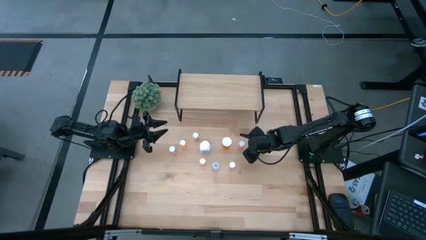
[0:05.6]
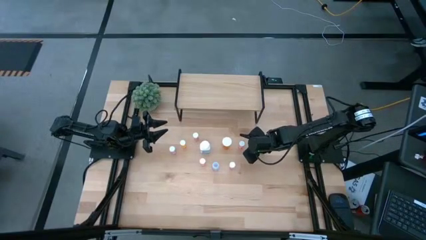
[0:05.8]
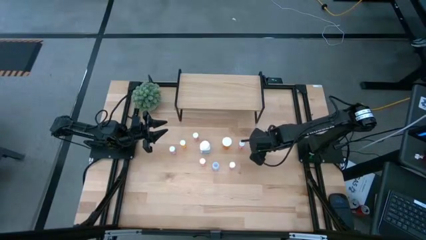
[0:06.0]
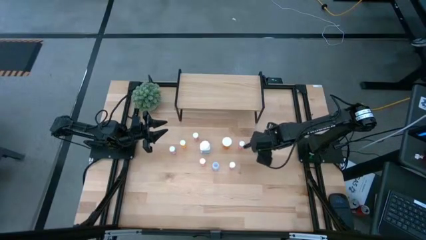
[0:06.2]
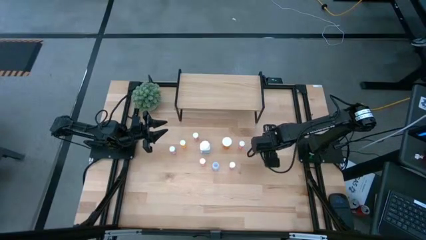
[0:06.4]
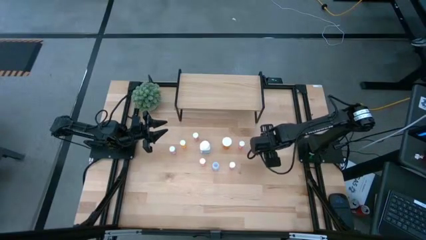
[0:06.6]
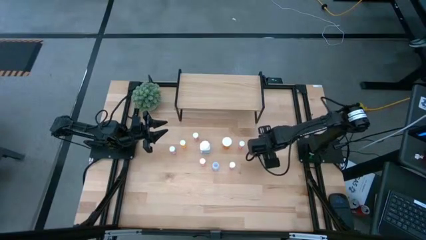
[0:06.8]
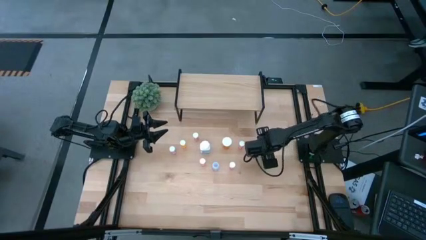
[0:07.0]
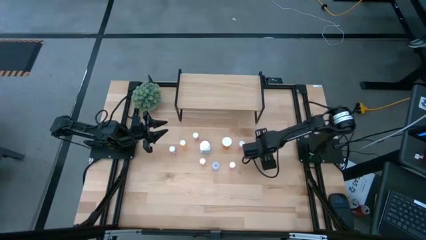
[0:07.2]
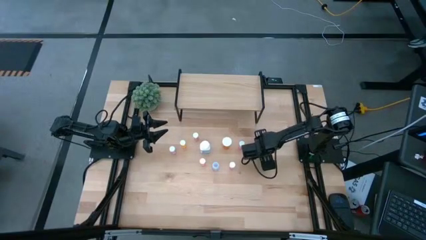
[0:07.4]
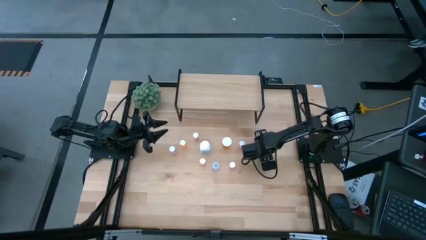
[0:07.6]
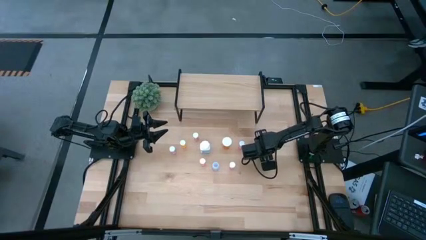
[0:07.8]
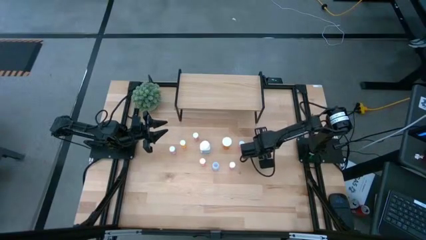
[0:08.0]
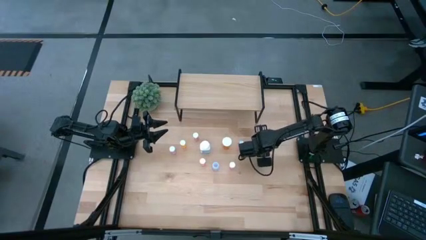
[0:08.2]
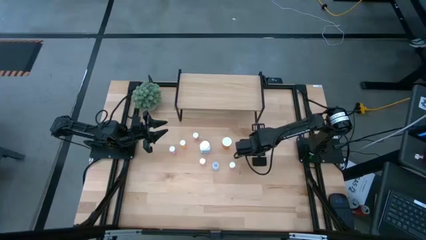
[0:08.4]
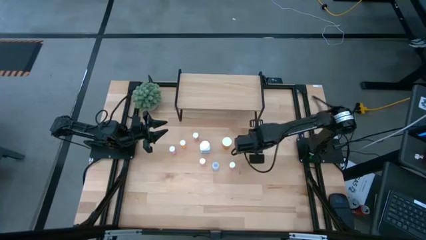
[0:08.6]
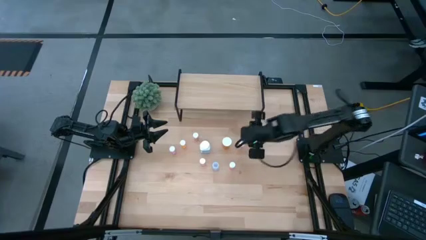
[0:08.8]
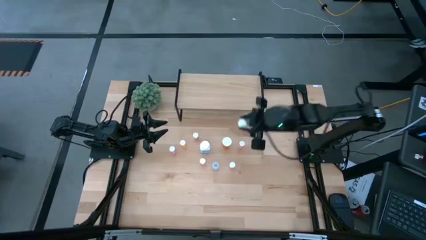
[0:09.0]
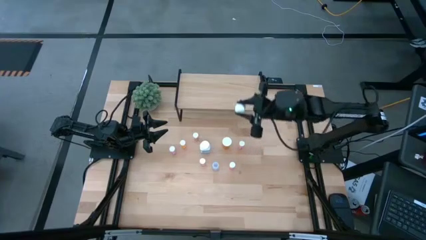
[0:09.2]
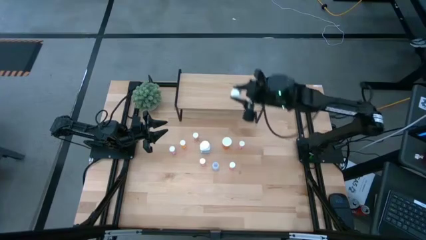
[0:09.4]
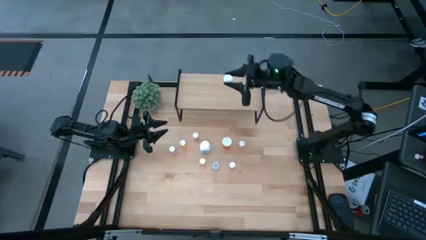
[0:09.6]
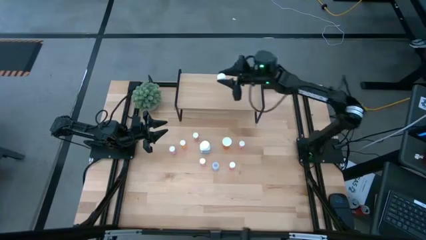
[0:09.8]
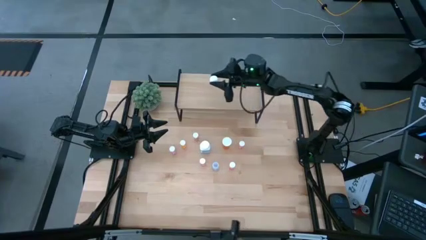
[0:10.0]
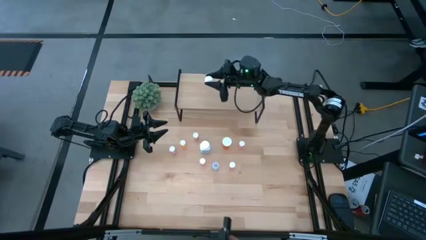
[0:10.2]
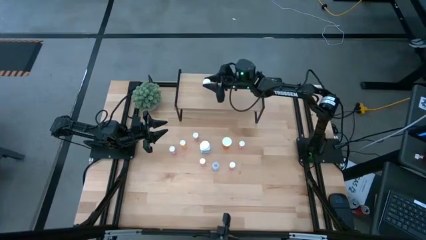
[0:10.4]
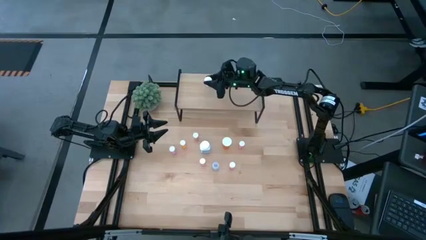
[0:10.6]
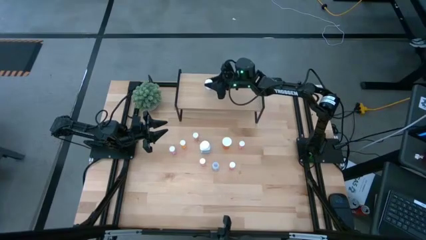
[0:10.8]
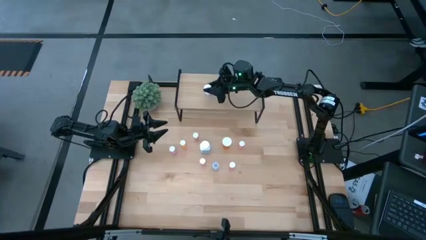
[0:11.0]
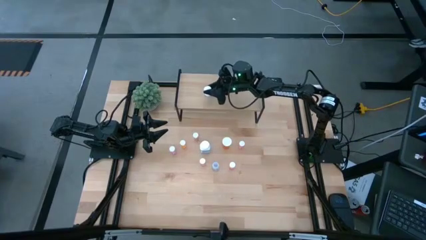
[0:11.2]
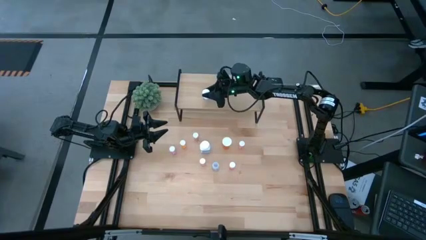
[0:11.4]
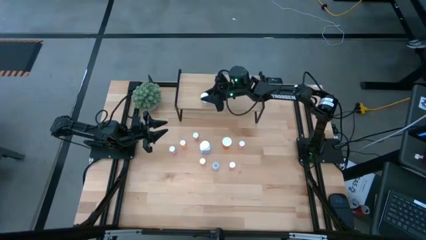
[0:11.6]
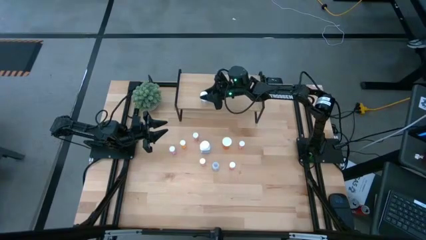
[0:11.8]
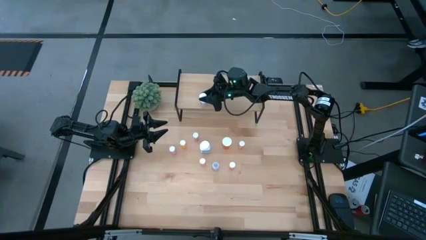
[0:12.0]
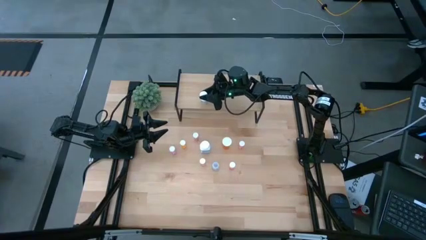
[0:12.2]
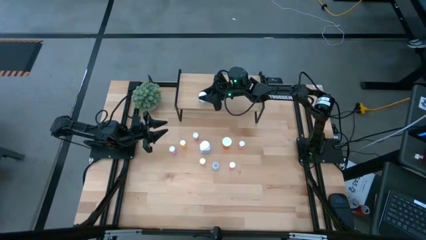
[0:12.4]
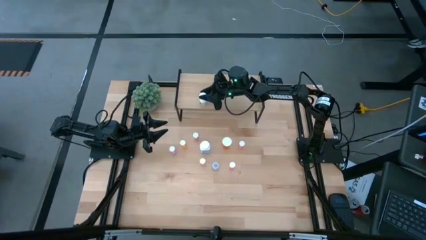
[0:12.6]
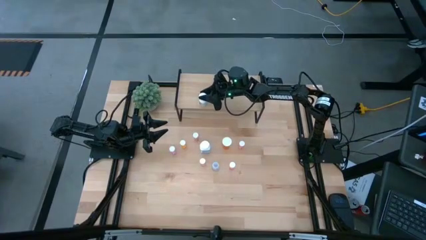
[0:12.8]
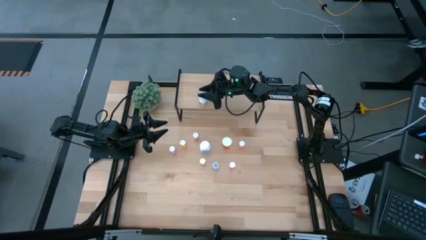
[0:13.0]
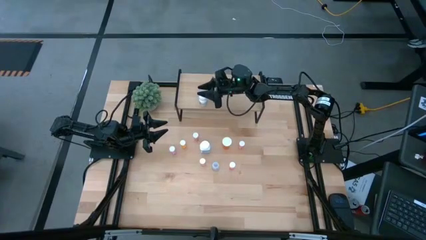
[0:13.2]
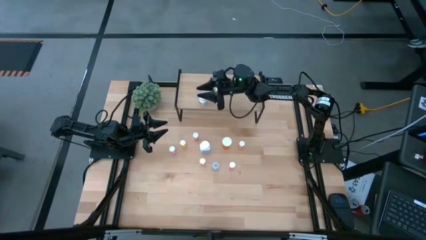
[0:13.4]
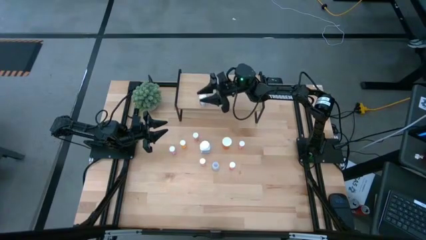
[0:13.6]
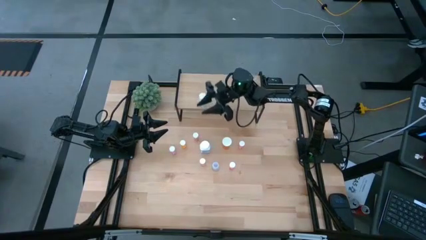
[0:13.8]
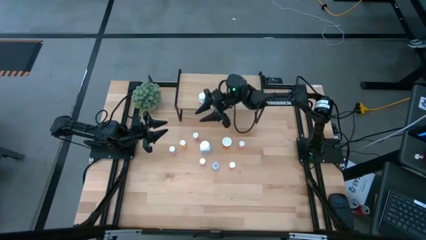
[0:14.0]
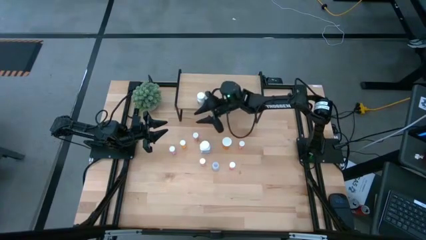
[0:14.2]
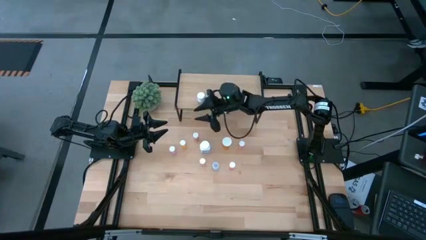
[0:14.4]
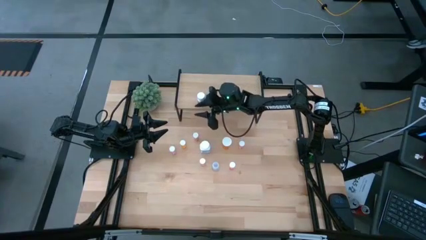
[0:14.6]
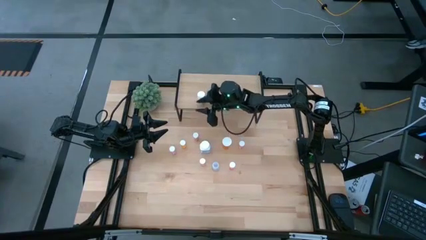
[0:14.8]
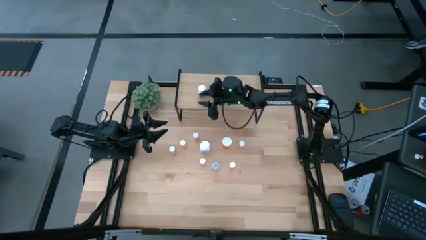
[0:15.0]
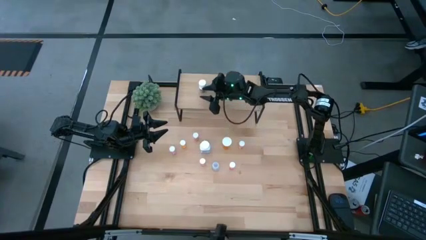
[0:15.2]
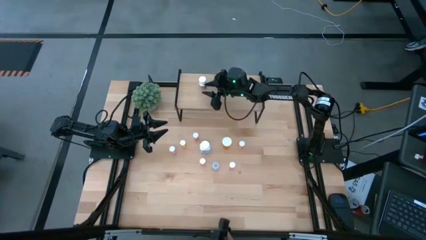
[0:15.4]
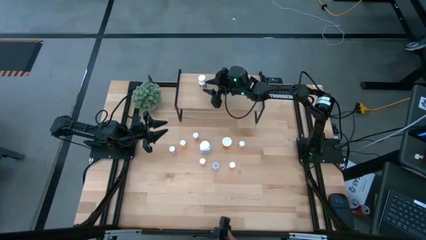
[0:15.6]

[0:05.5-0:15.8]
Task: Pick and place medicine bottles onto shelf by color
Put the white medicine bottle on the shelf

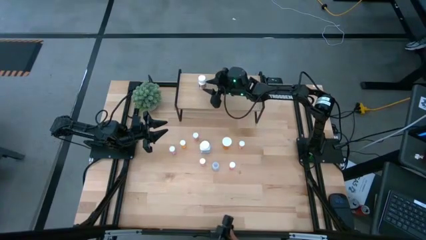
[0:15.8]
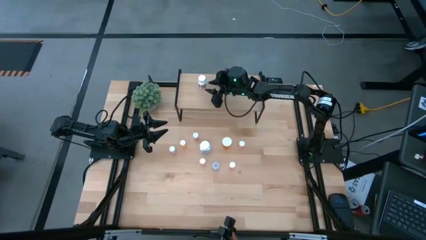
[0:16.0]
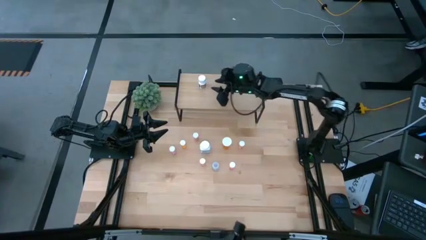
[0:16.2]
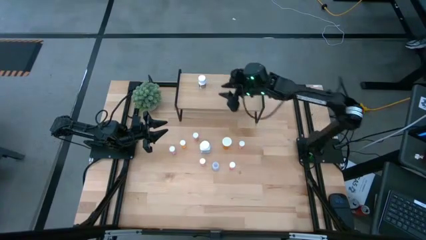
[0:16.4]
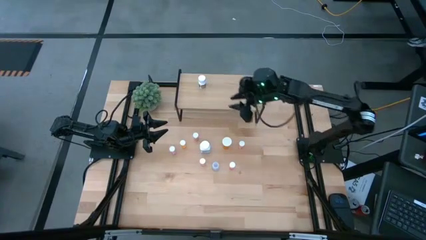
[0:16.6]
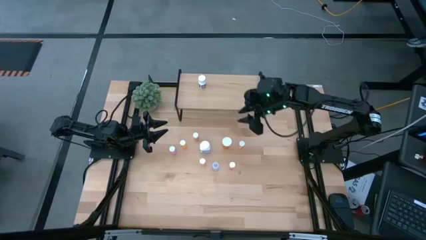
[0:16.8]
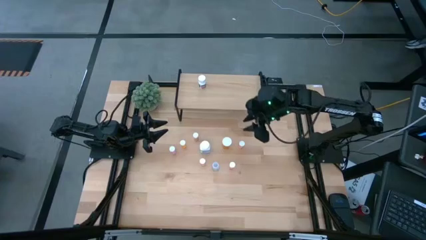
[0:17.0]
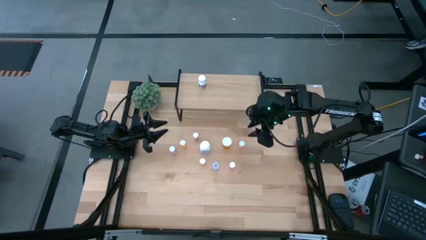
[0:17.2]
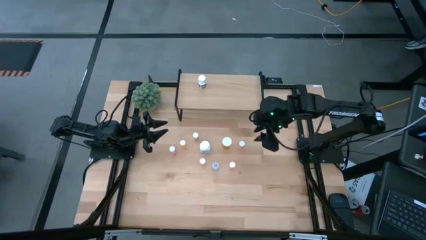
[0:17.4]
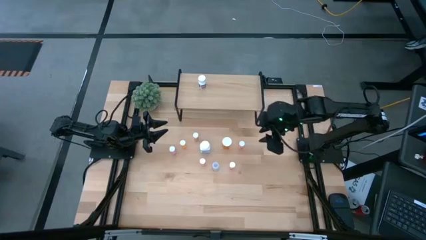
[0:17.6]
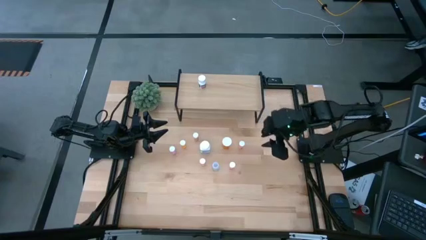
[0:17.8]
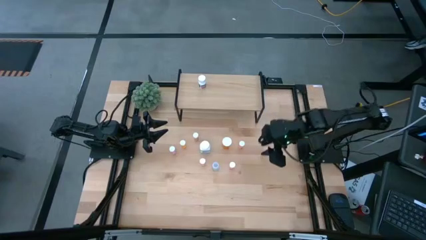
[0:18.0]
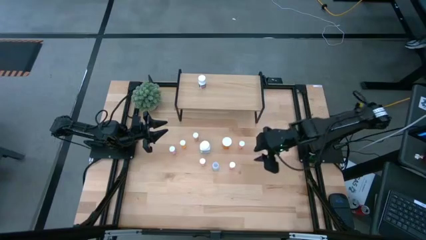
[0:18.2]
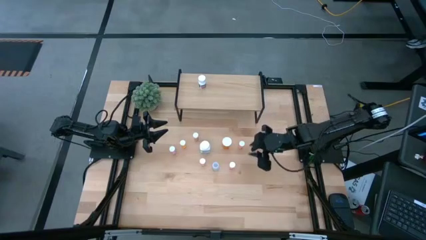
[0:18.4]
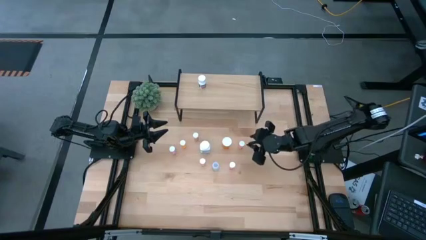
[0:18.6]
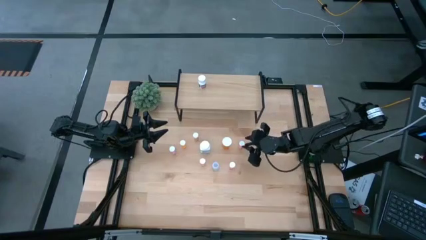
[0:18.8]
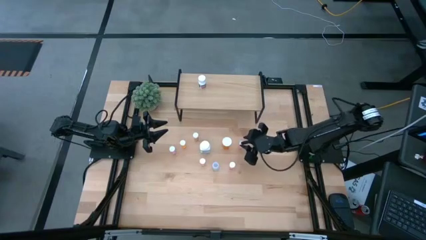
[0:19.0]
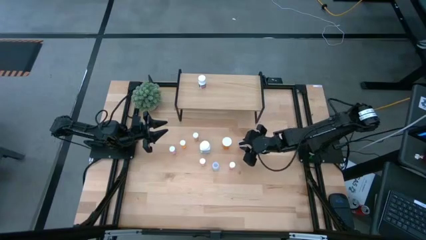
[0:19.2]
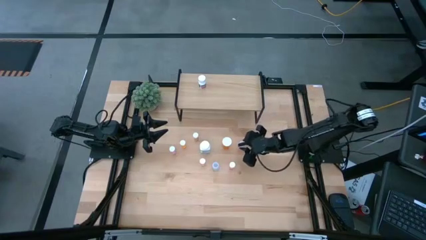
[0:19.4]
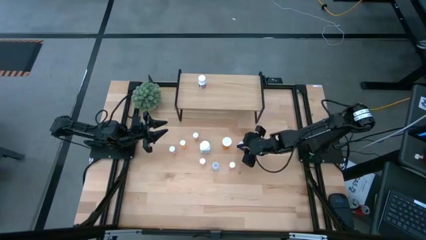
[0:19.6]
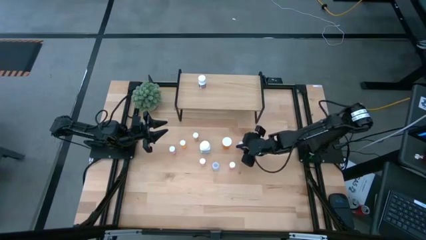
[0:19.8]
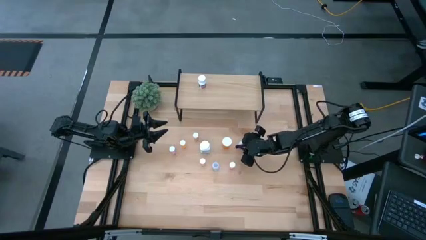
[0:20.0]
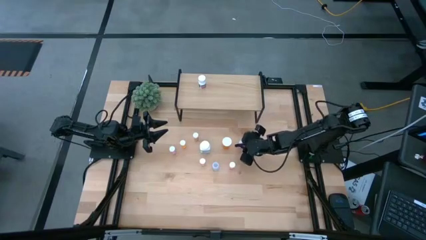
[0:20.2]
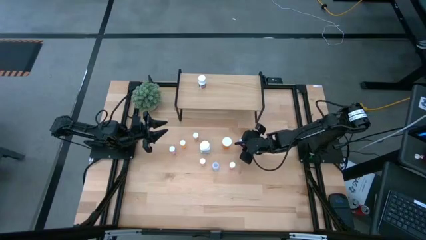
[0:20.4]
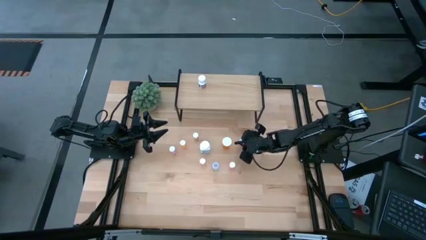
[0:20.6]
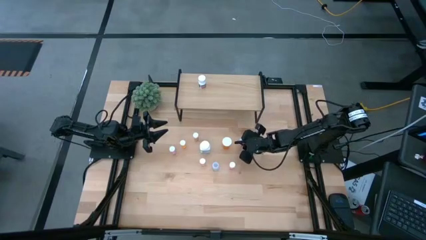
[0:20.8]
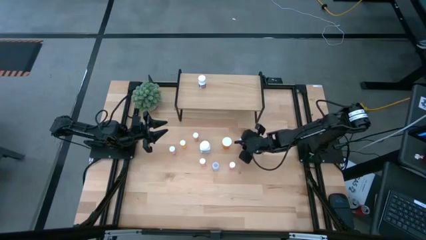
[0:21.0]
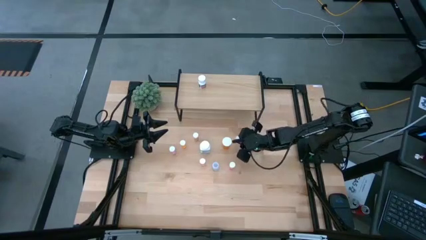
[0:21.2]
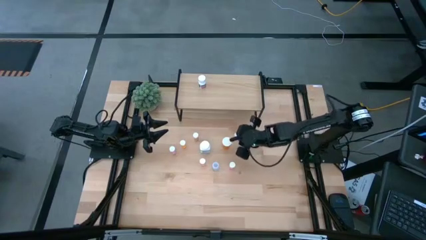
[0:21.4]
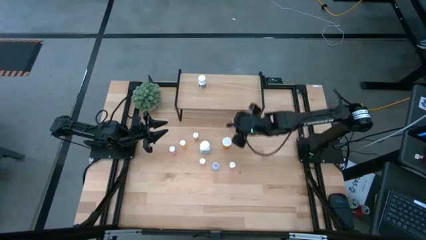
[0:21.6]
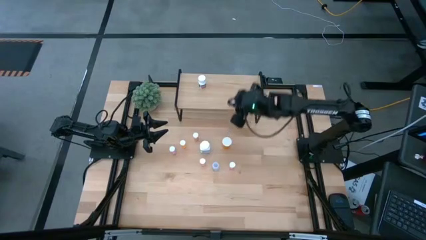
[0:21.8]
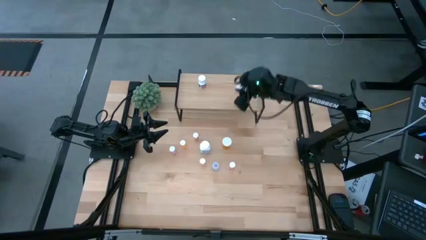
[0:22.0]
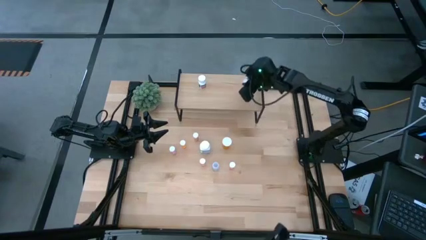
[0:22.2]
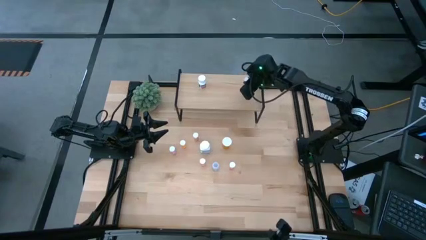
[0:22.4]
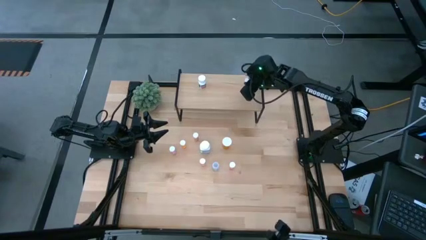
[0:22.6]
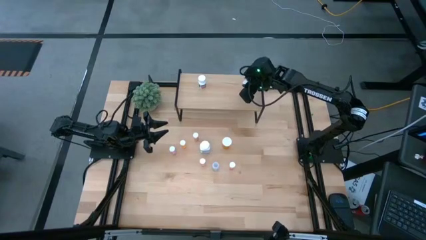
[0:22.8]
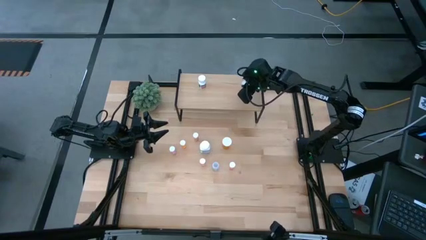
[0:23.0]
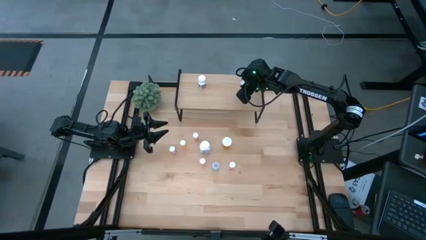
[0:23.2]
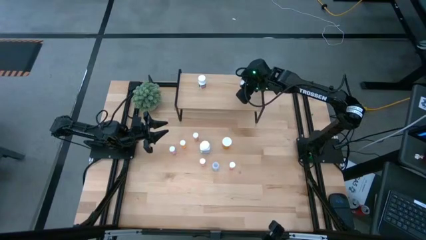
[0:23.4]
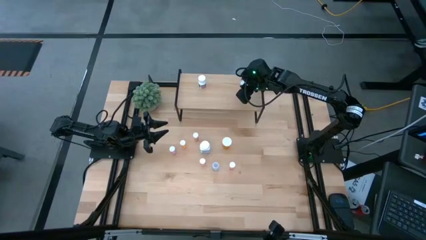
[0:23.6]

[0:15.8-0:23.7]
Put the pink pill bottle on the shelf
